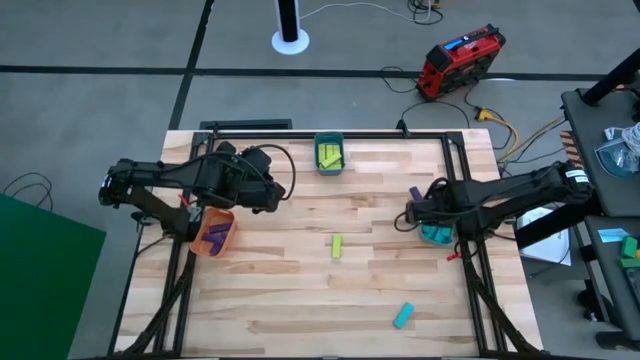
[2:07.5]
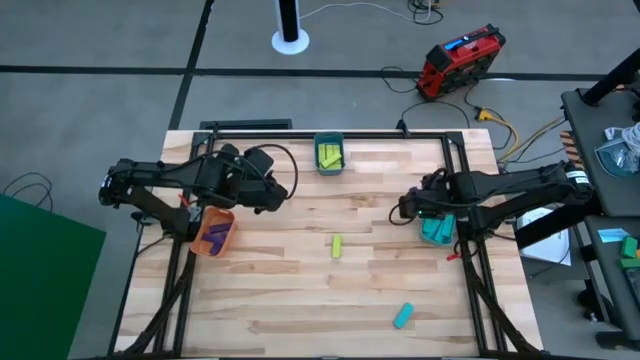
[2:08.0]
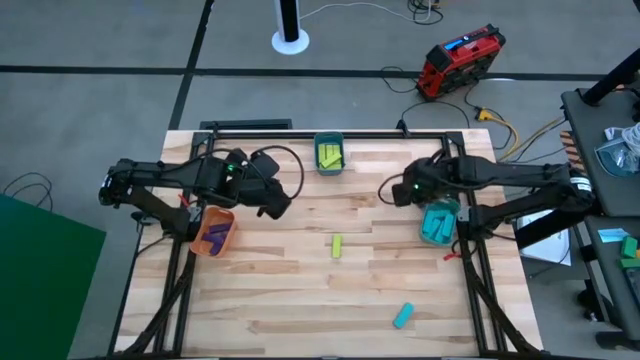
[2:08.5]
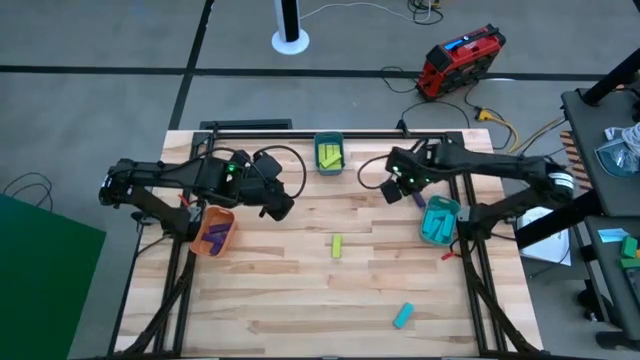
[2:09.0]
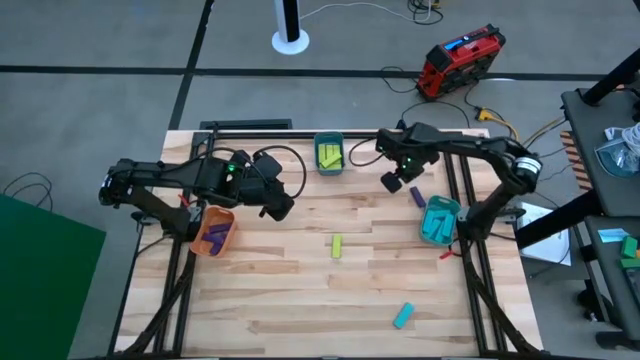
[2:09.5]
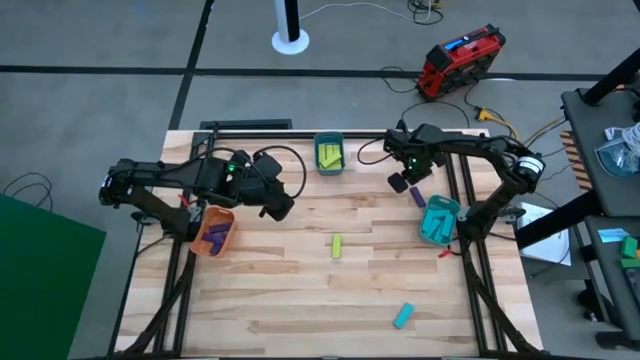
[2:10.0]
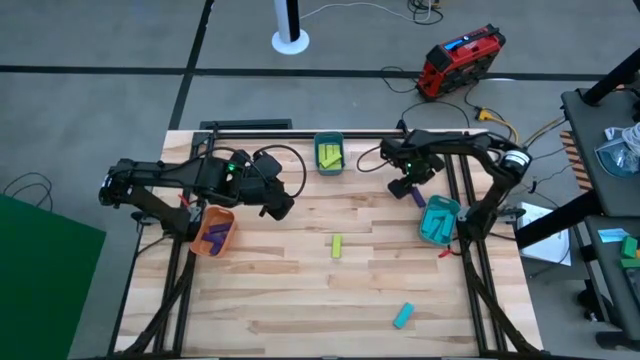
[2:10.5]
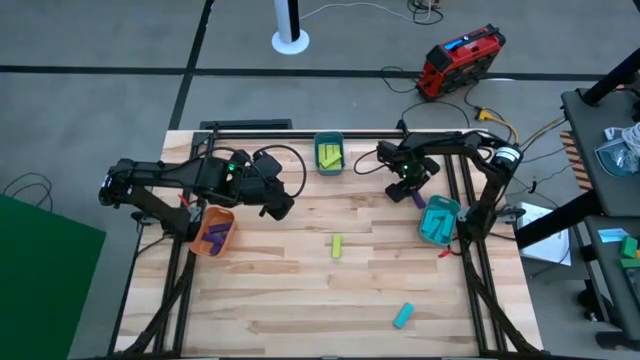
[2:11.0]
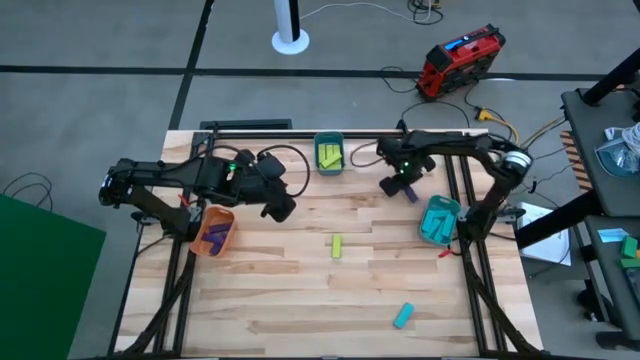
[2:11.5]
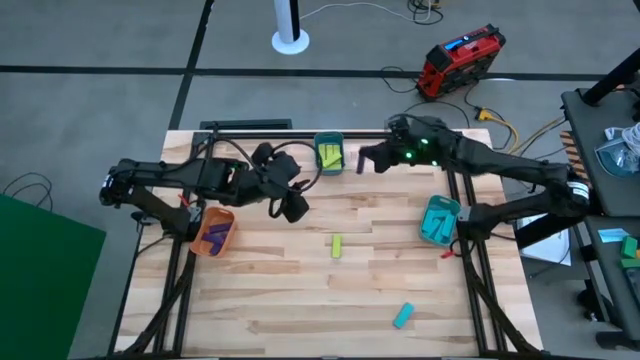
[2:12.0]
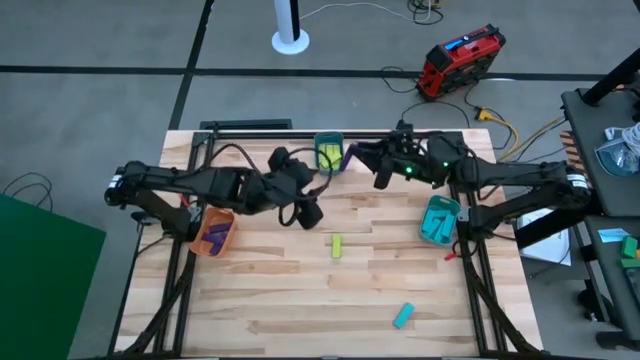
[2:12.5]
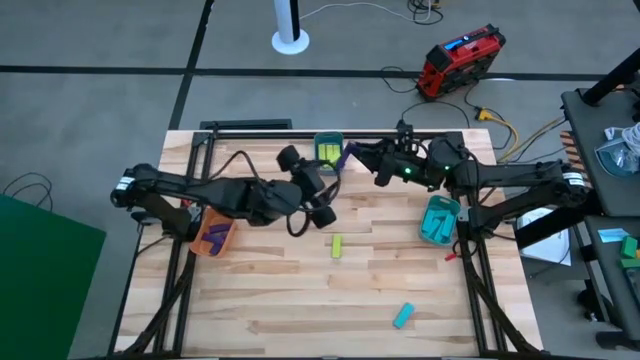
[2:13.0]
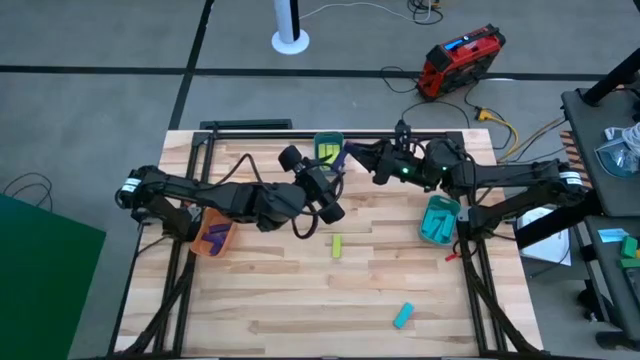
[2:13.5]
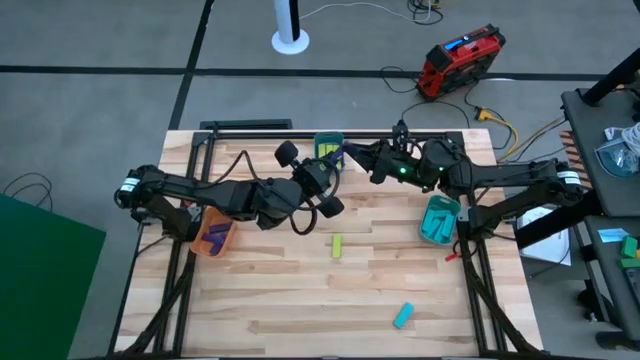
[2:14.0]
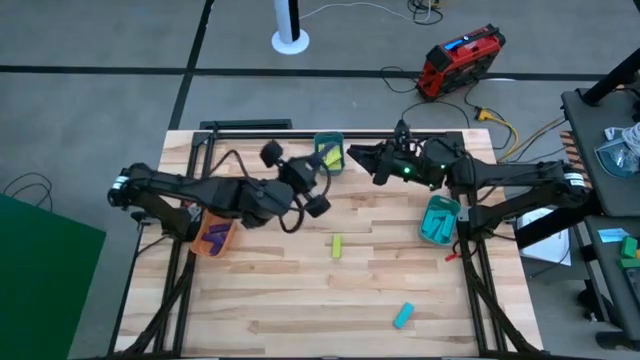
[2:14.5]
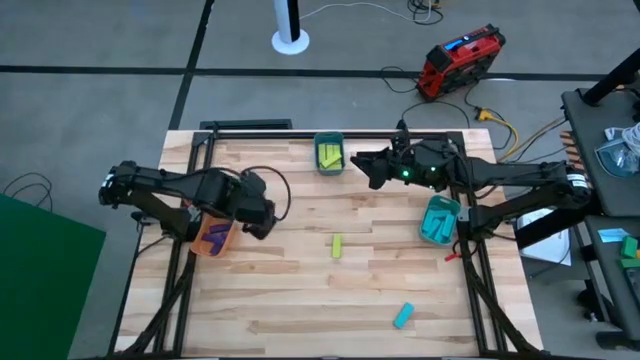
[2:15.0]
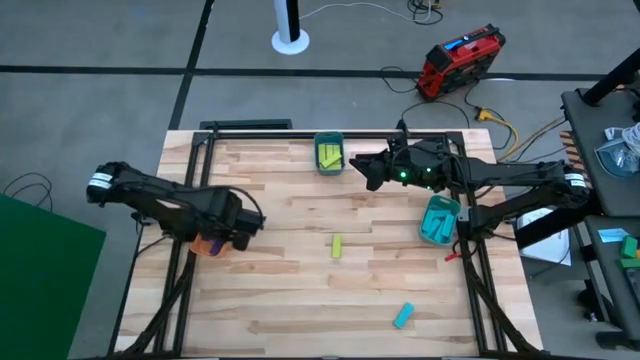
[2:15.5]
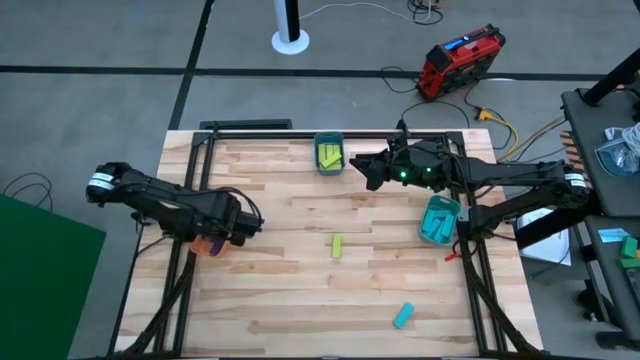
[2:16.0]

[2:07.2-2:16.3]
Task: Sort blocks
Put the violet block into the orange bin

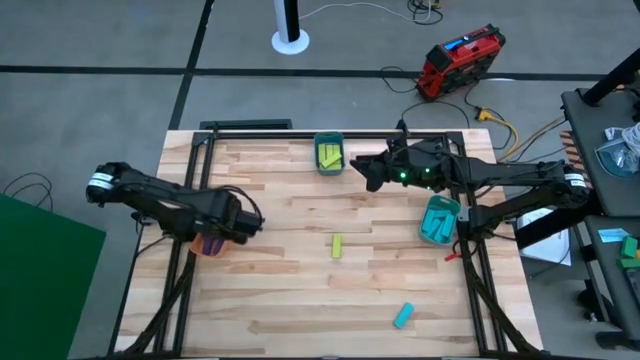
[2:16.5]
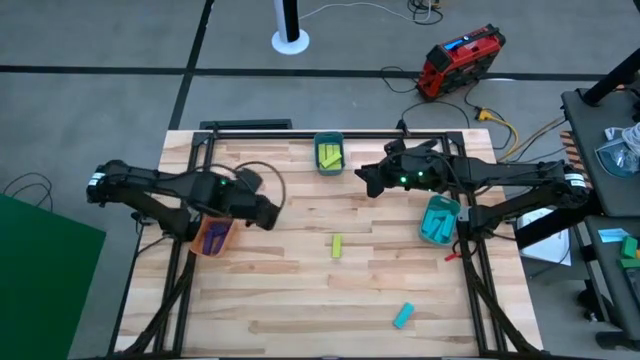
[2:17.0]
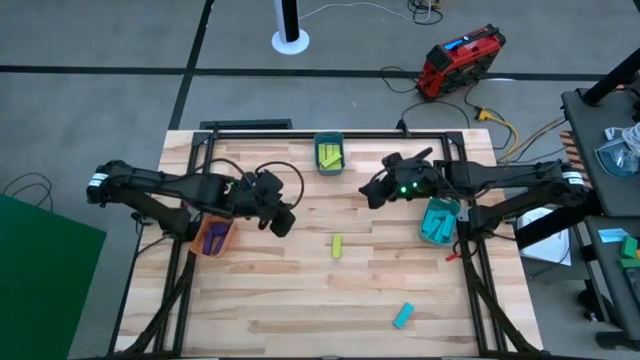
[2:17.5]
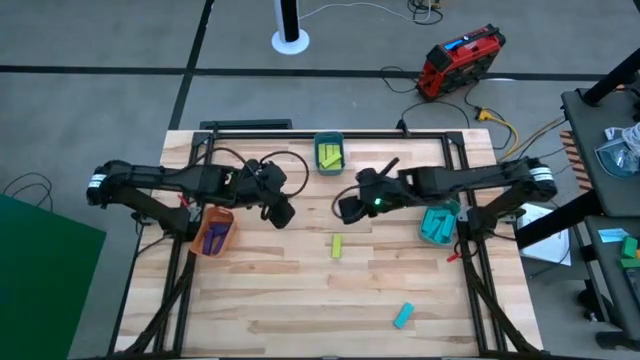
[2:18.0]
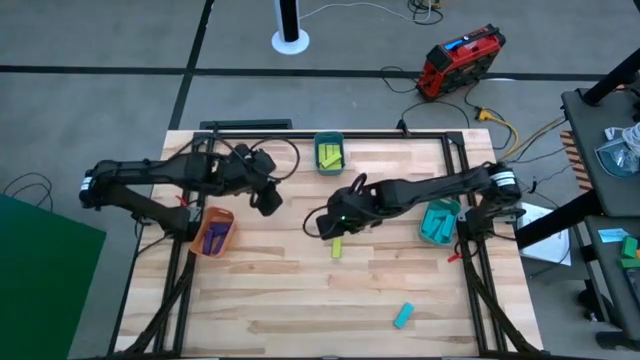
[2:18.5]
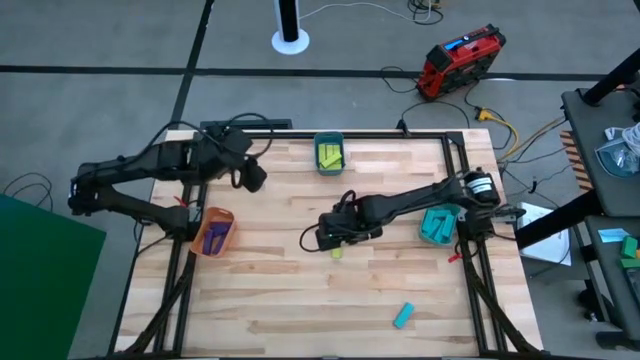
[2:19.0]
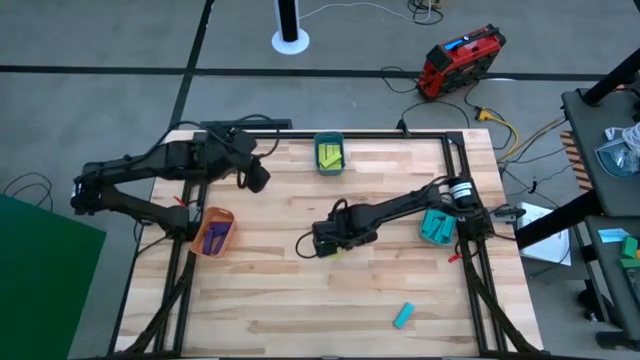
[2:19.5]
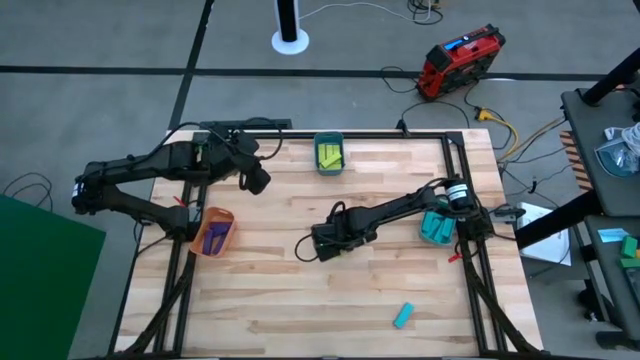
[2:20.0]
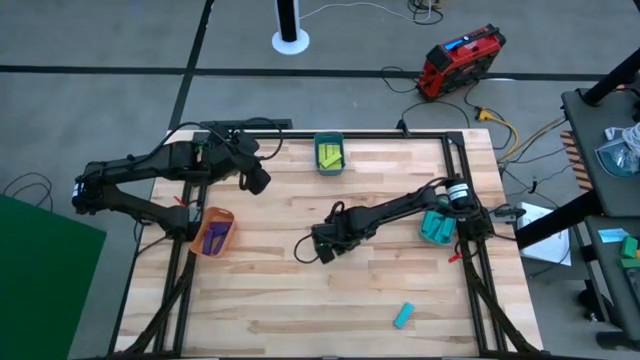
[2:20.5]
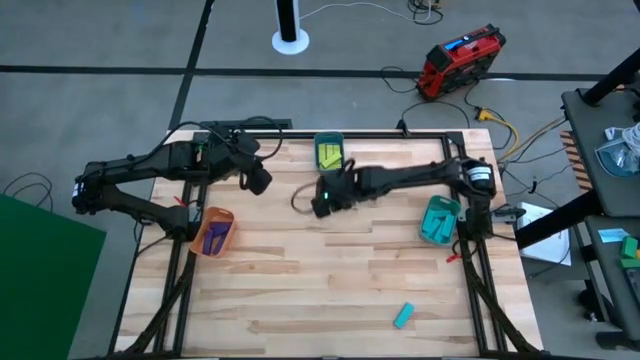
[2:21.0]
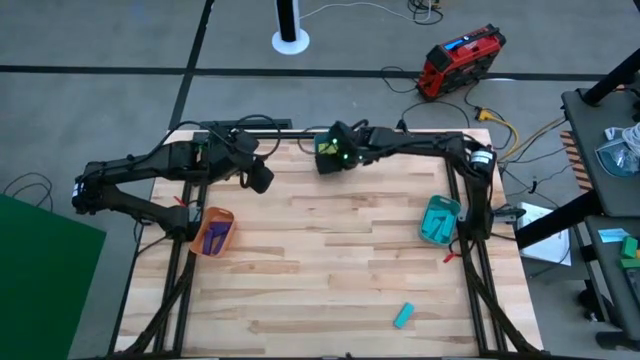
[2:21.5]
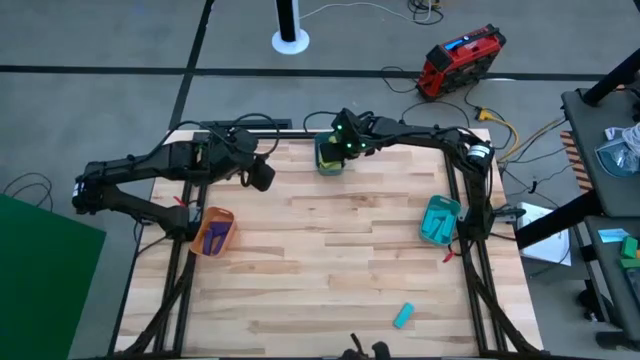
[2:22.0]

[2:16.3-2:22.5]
Put the green block into the blue bin

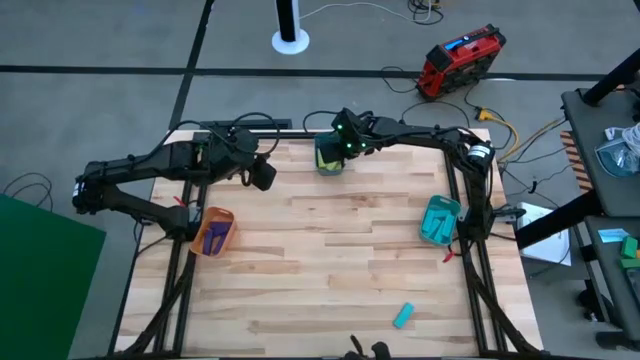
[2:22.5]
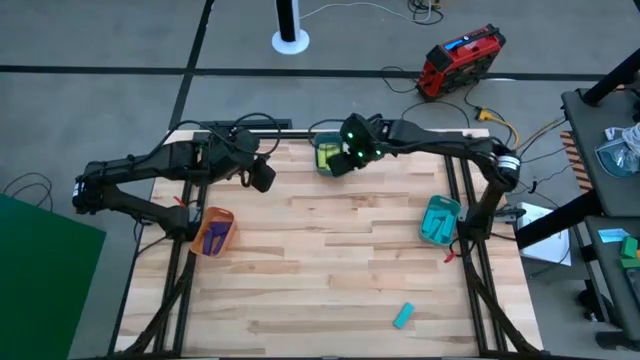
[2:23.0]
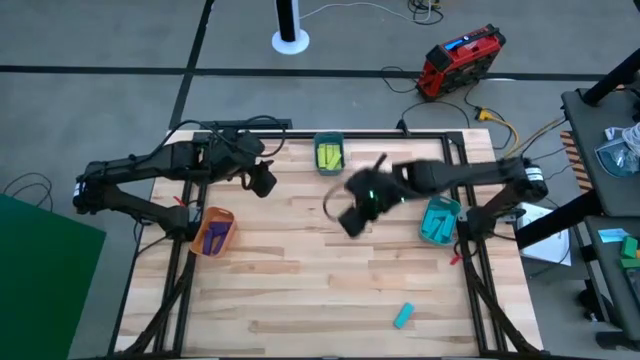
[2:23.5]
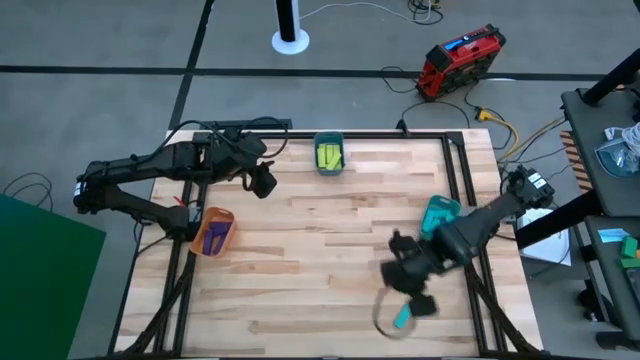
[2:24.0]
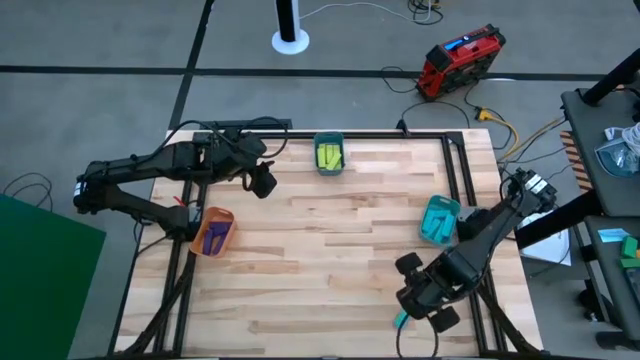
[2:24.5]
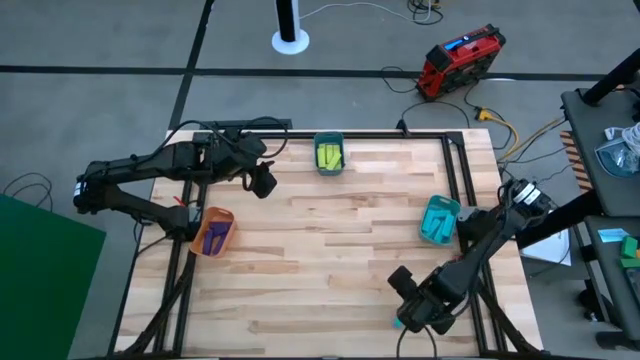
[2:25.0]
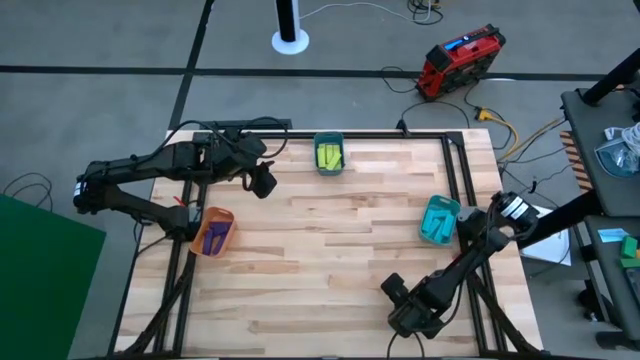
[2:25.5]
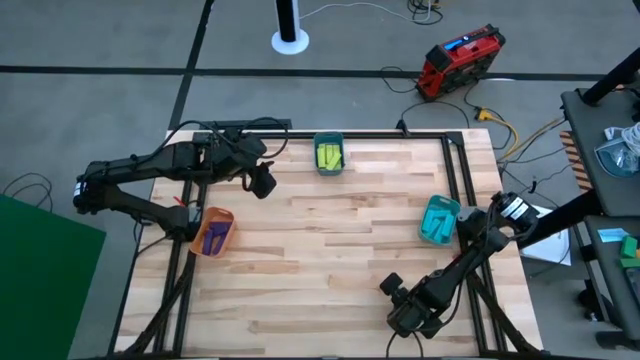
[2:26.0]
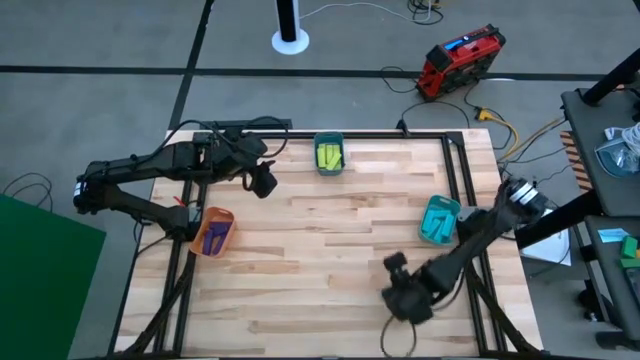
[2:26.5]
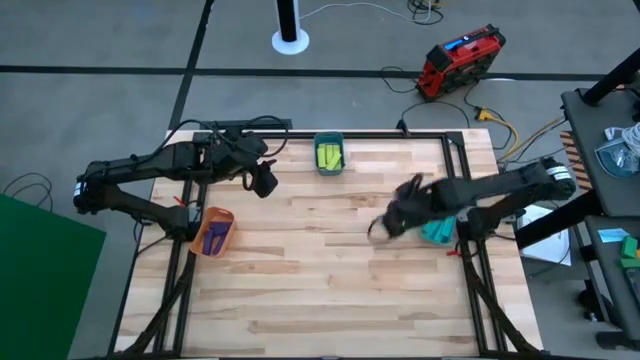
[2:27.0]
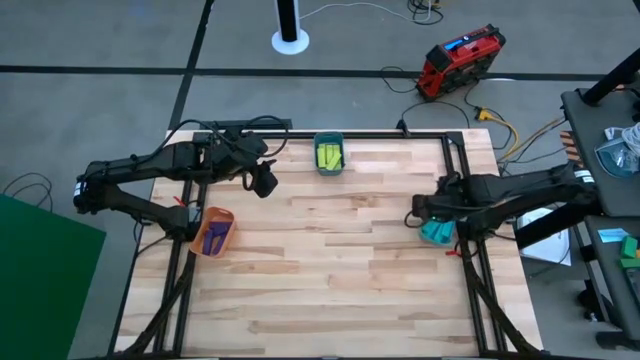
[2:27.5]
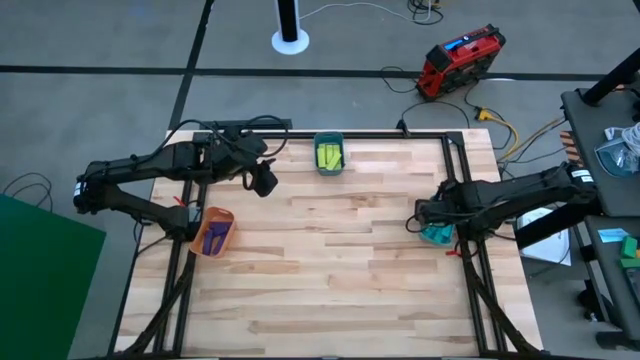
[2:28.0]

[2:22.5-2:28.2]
Put the blue block into the light blue bin

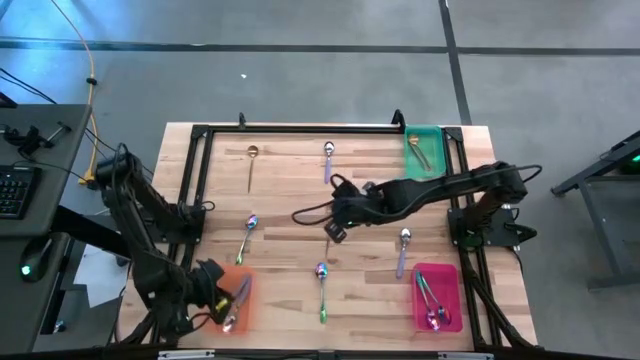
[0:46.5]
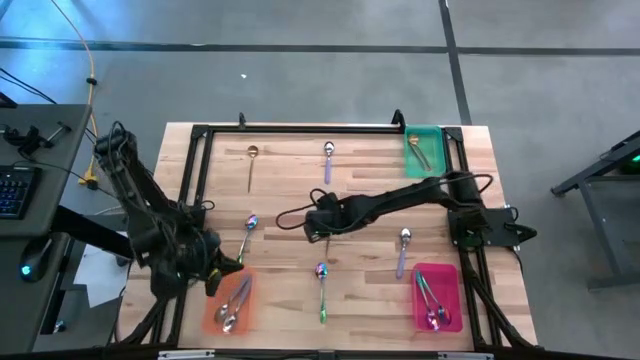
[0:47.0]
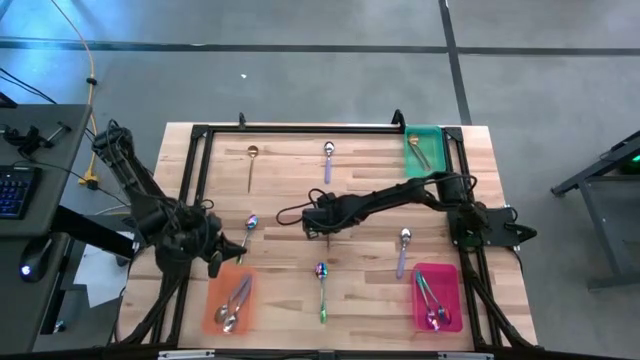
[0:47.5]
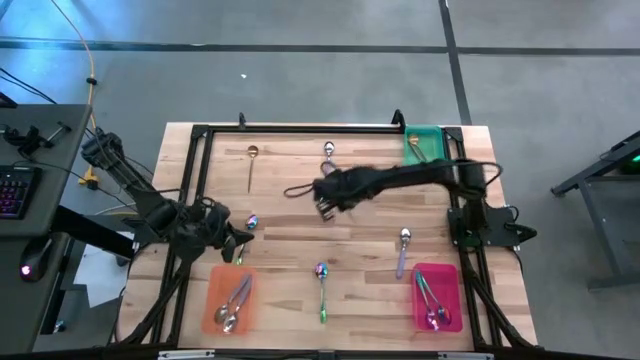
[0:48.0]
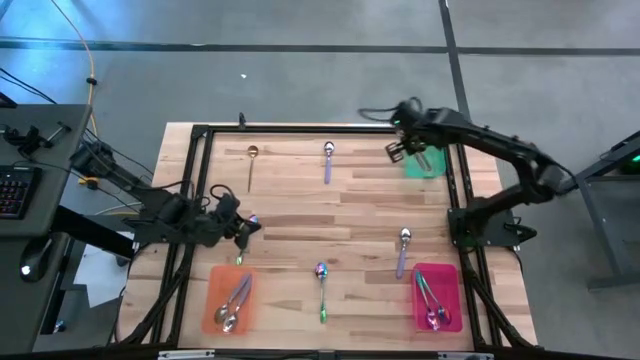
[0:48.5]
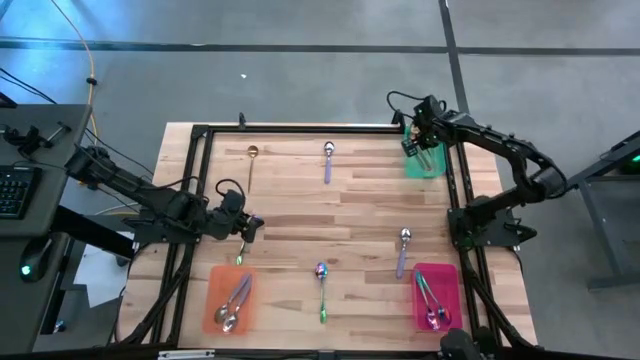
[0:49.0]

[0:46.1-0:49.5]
Task: Sort silverware by color (type)
Put the golden spoon into the green bin
